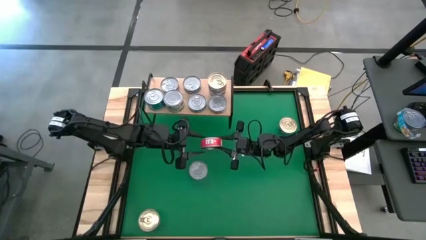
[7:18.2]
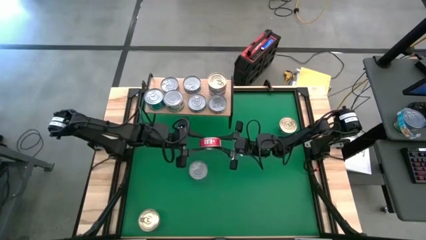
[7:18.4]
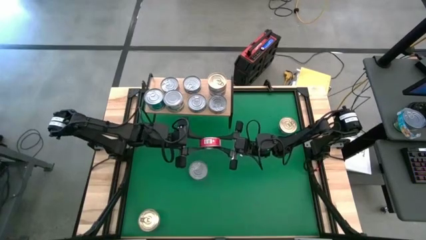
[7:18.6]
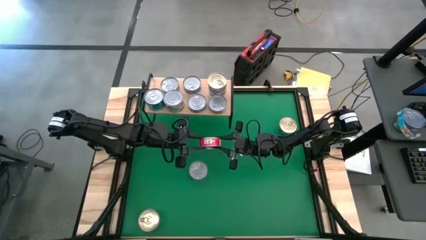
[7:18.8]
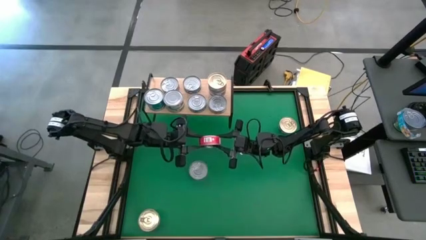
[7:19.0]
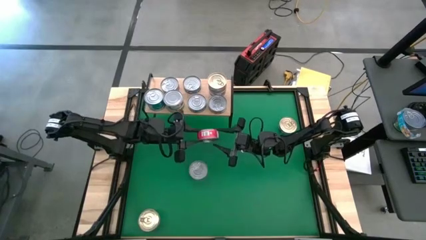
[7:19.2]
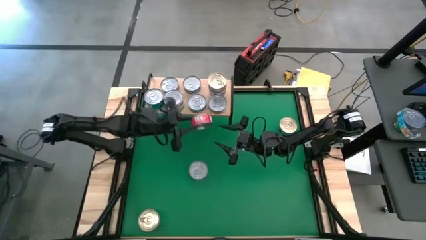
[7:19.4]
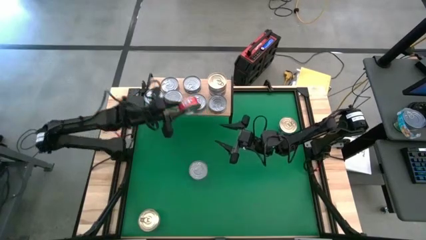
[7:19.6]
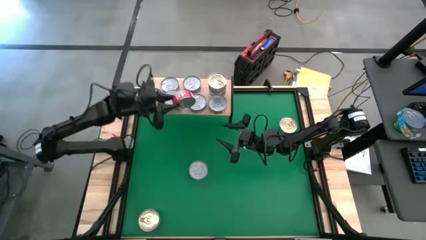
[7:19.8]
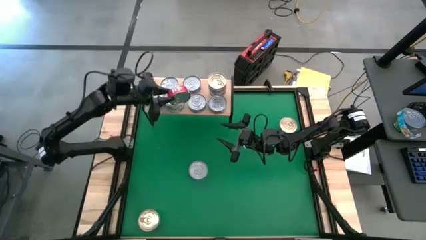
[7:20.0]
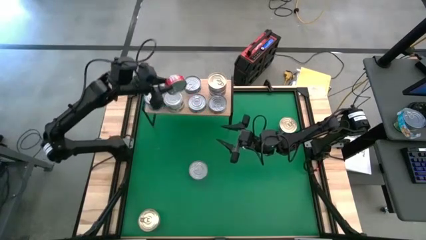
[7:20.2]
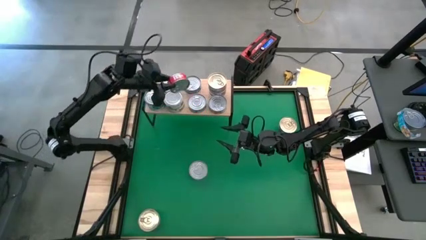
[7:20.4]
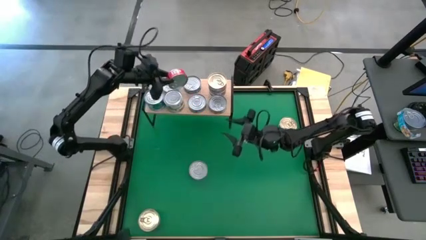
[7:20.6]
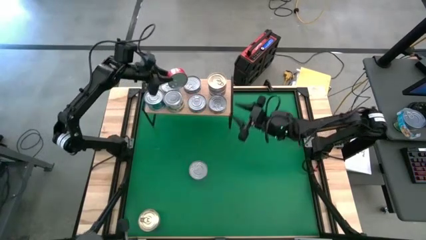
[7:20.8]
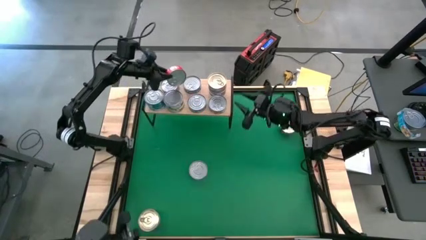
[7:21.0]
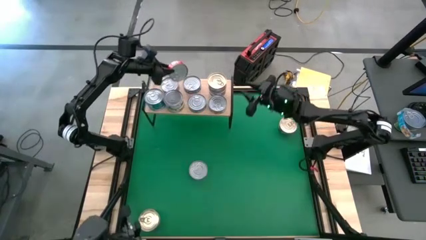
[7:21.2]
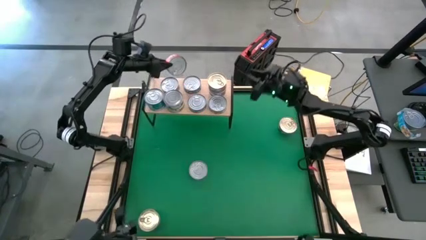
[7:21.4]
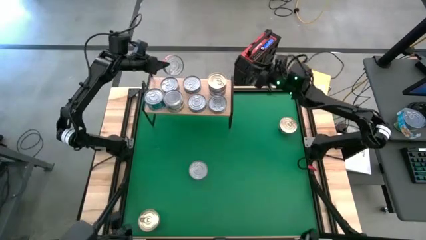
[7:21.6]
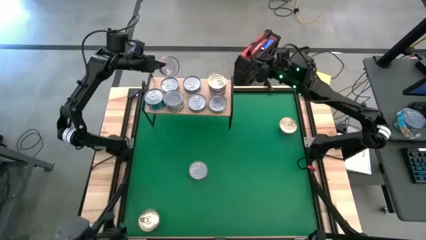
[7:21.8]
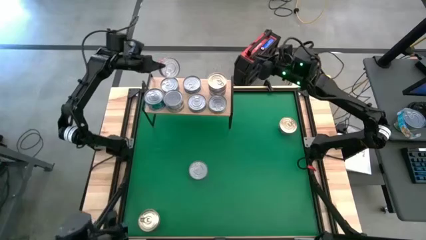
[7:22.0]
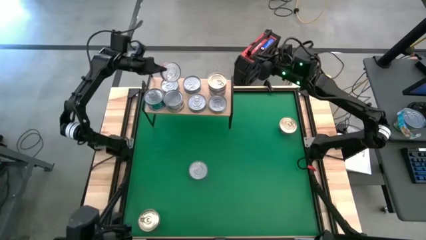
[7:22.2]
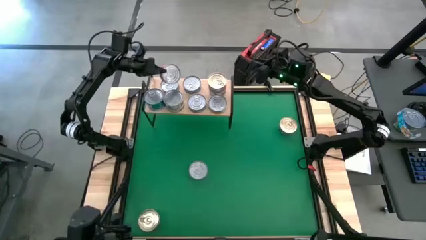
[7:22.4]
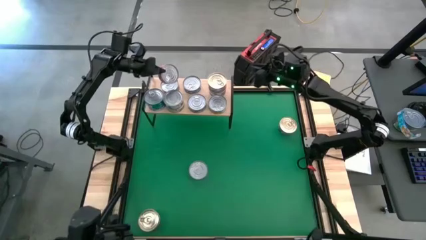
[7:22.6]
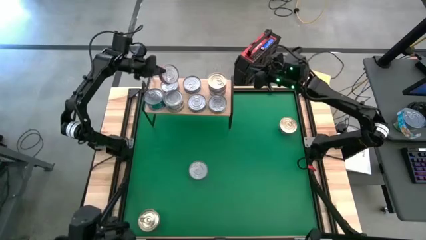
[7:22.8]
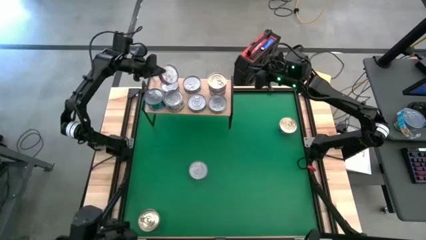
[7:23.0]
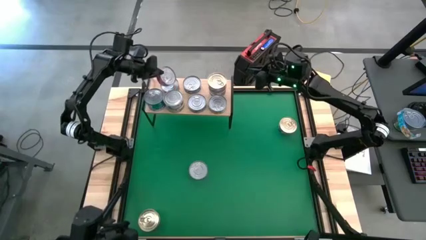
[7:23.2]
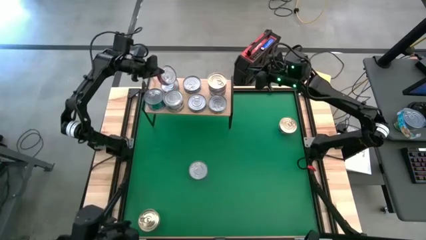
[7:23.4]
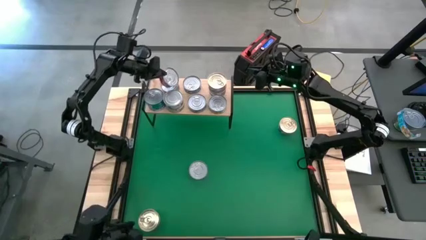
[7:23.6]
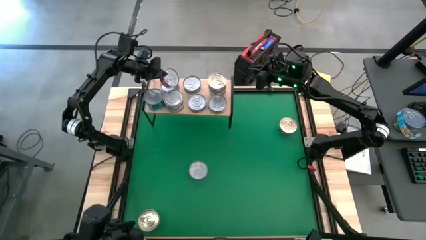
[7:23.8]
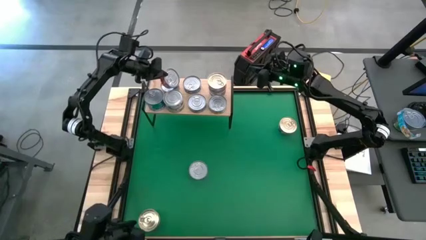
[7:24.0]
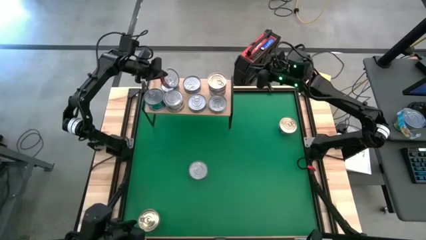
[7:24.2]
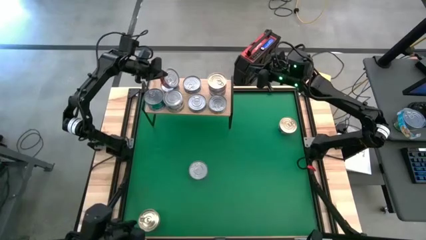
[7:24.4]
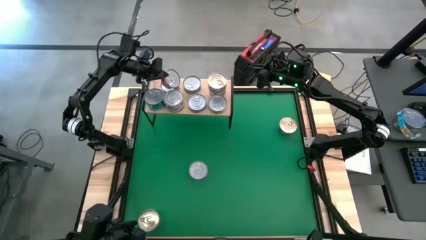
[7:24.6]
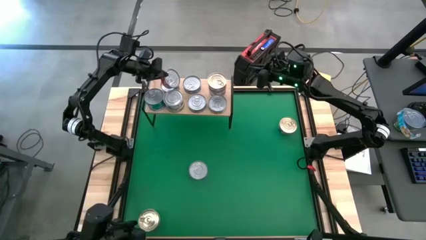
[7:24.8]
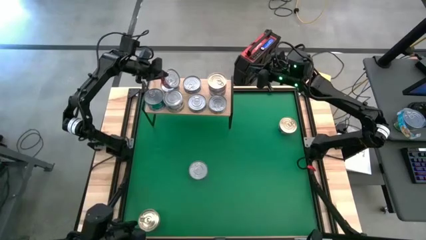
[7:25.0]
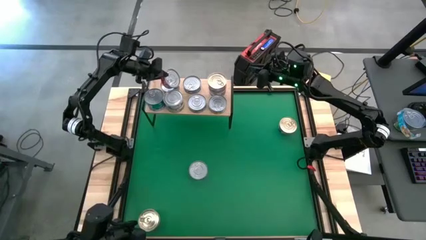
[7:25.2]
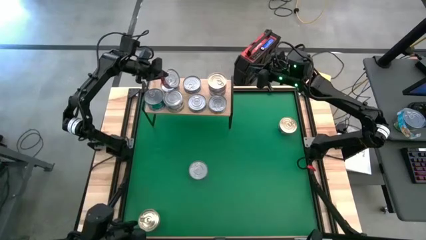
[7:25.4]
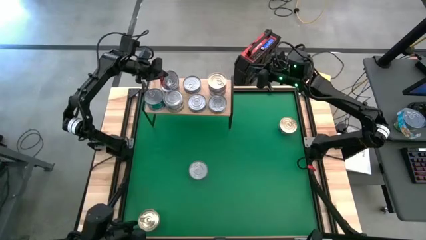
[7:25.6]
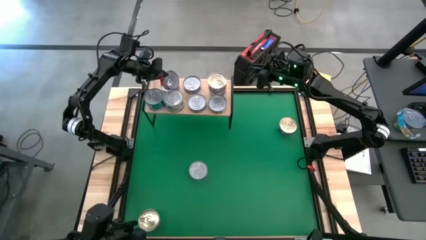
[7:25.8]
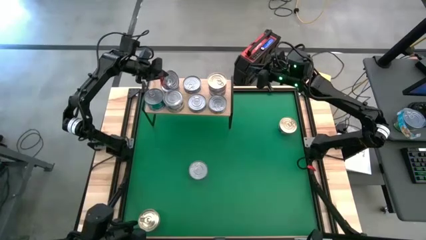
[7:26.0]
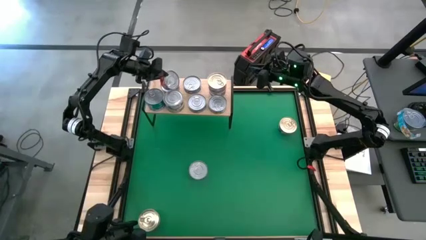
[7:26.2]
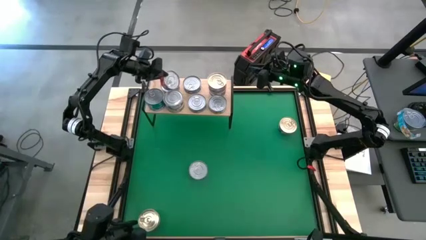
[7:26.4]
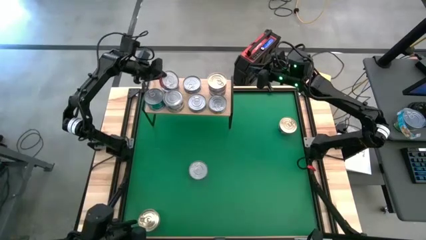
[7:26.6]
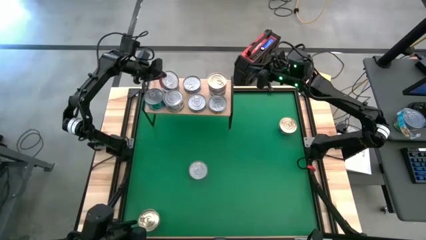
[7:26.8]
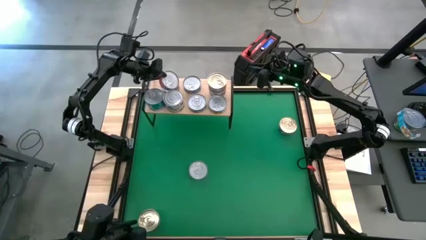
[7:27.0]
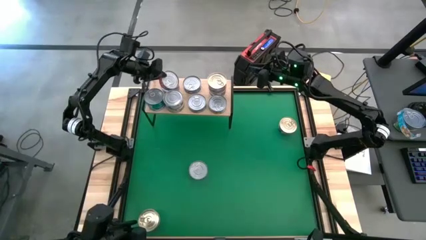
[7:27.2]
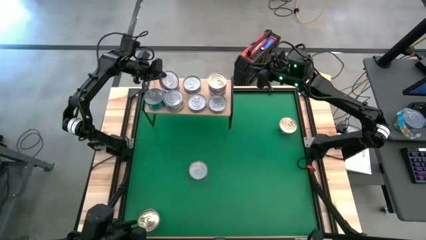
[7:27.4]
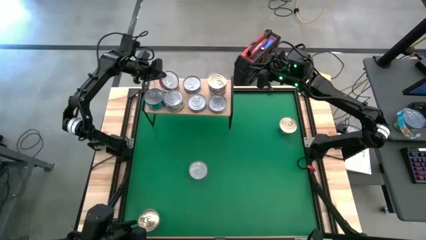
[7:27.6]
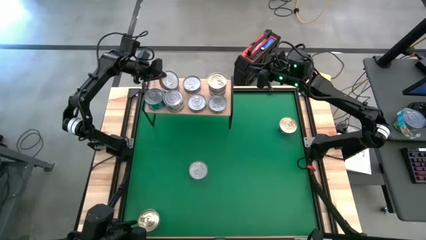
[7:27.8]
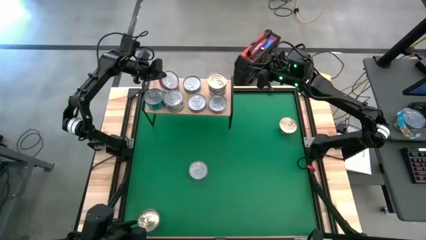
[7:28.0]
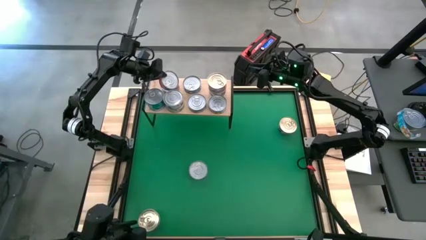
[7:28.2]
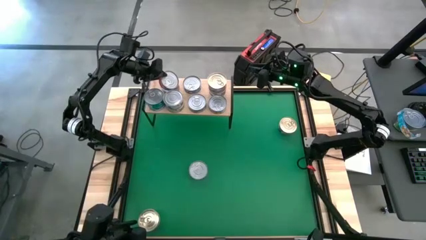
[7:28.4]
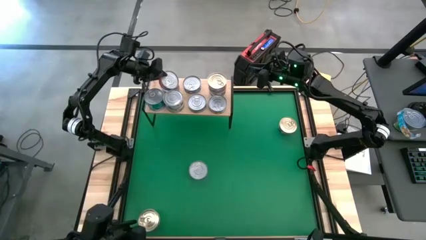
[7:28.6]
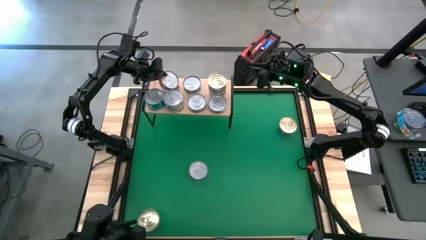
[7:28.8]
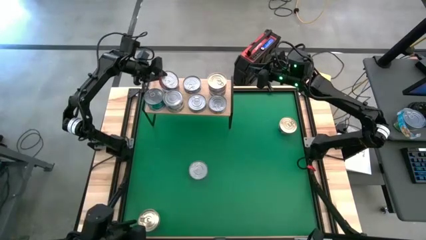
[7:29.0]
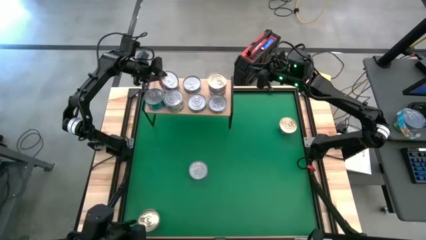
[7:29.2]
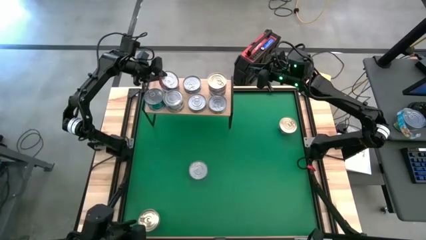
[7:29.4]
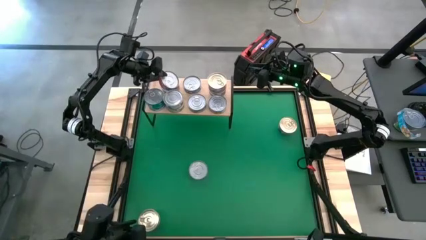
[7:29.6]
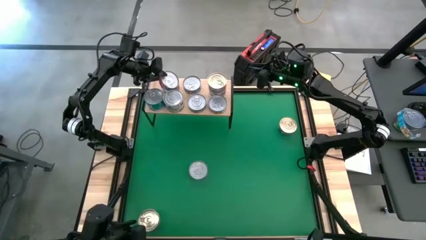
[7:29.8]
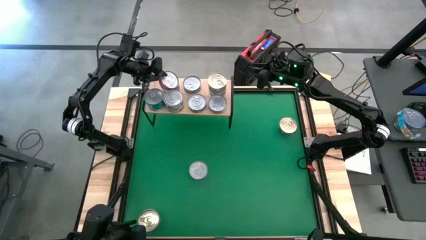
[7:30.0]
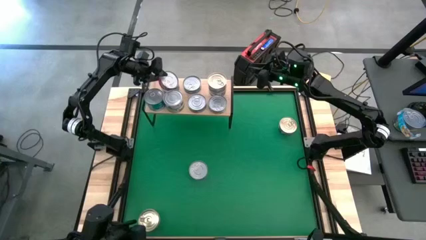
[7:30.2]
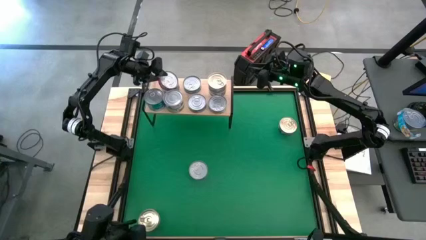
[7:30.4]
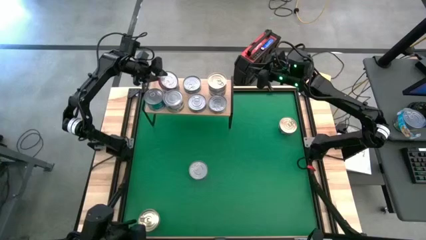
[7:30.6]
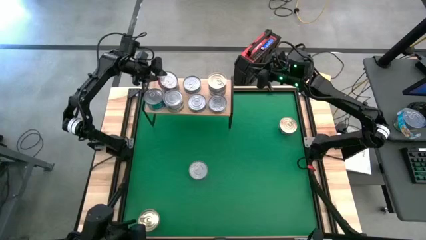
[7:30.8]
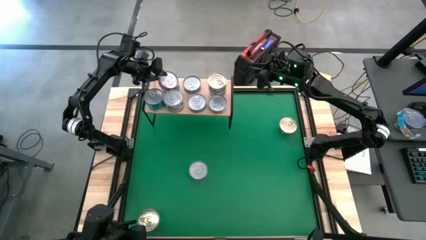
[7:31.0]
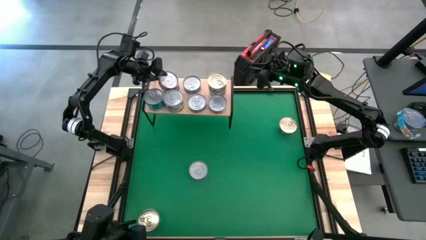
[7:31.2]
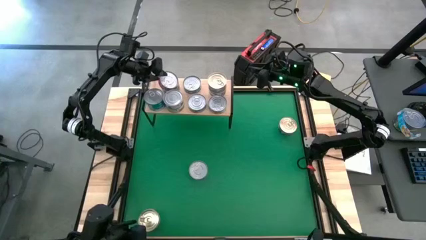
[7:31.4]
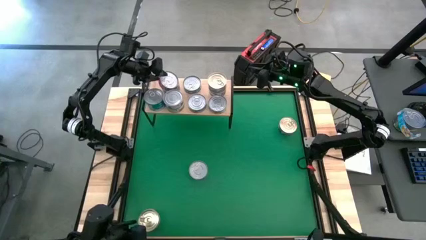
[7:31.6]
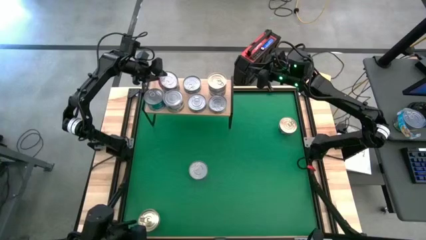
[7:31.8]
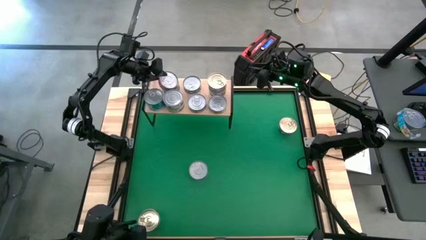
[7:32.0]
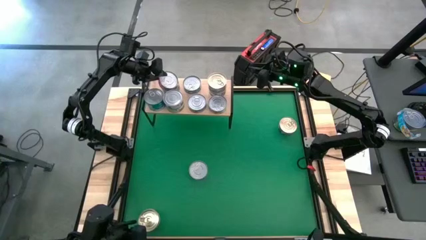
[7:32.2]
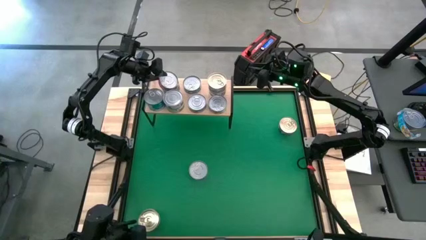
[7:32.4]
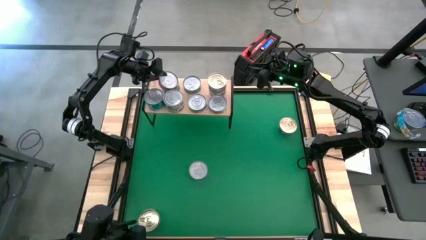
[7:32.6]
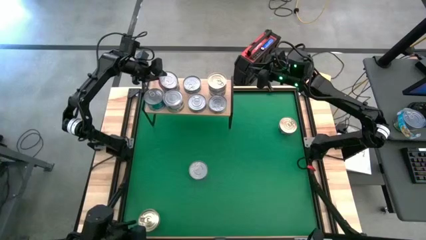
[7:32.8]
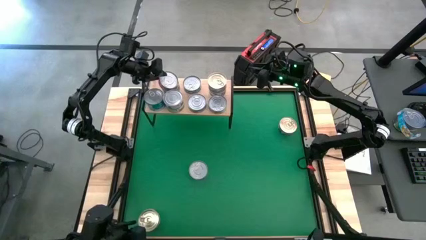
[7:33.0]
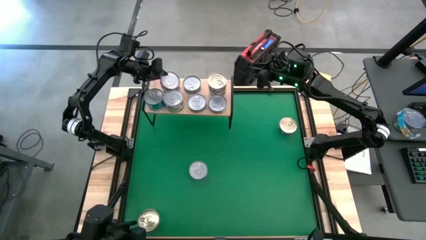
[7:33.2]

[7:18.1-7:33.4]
Task: Stack canned seafood by type on shelf
Stack the red tuna can on top of the red tuna can on the shelf
